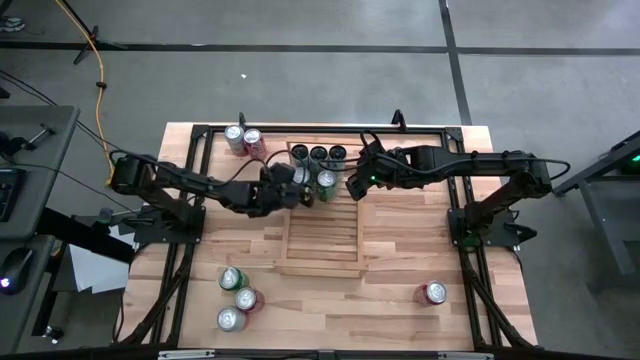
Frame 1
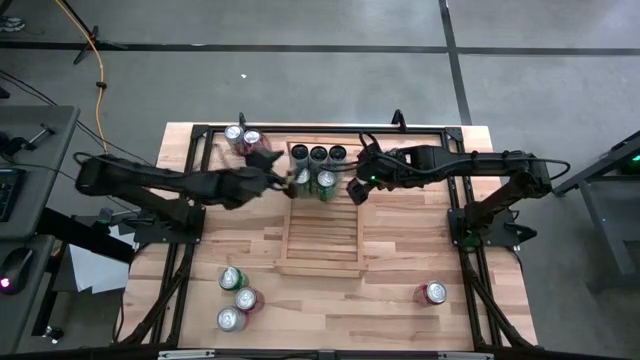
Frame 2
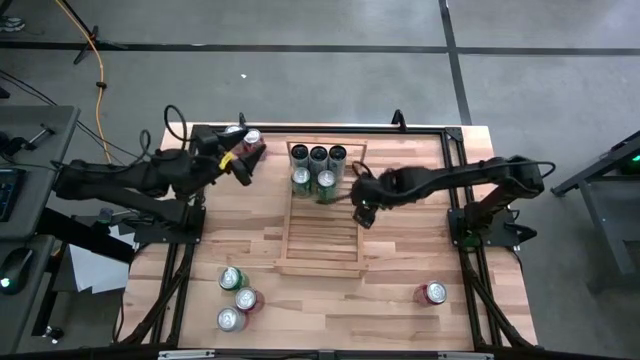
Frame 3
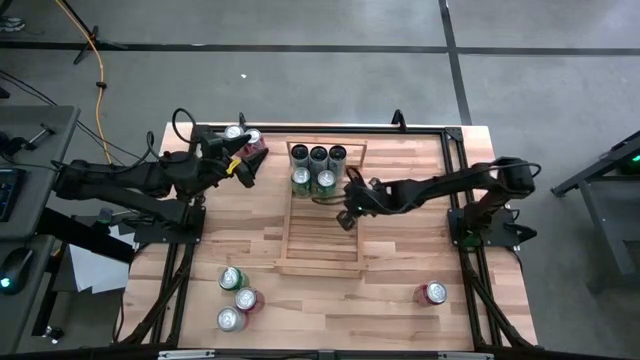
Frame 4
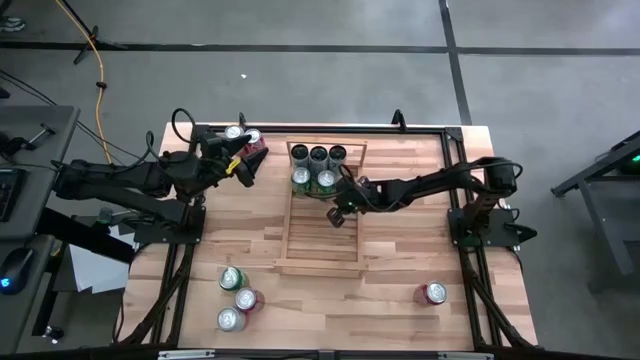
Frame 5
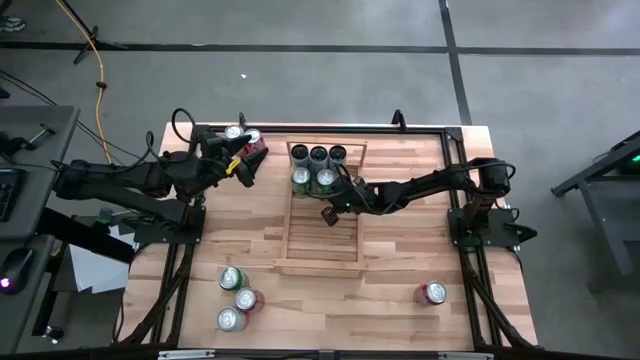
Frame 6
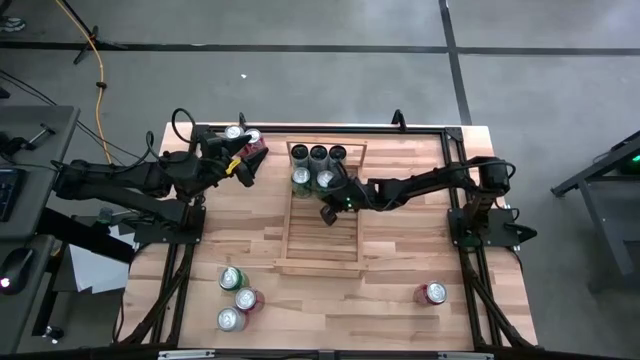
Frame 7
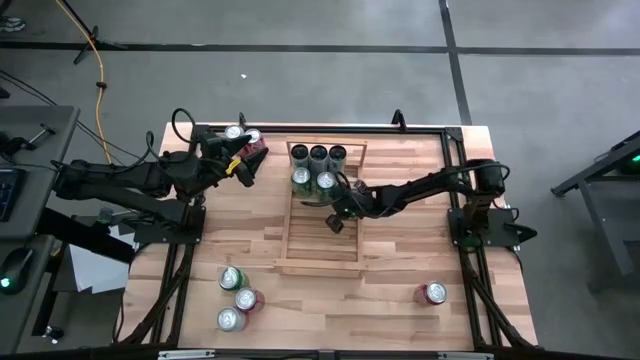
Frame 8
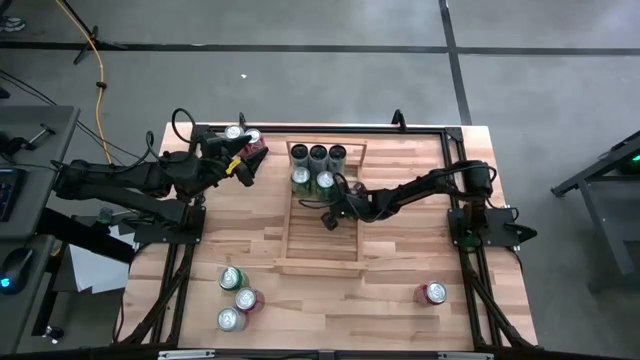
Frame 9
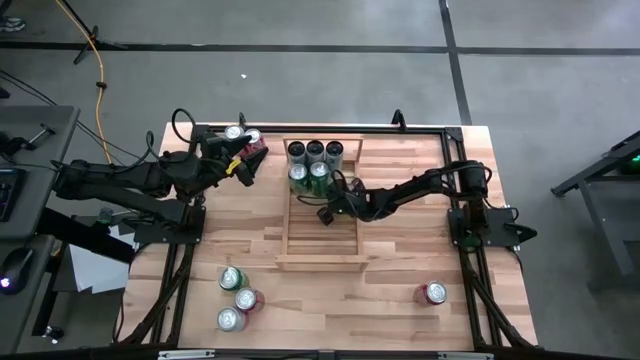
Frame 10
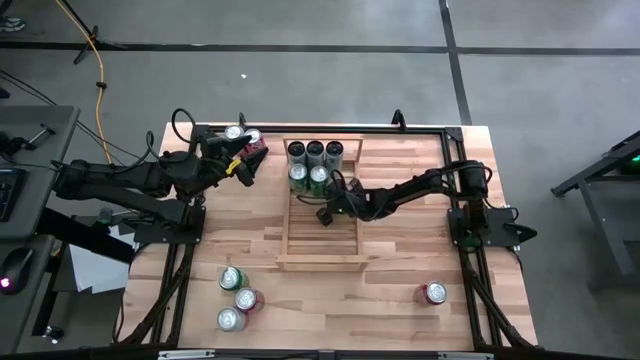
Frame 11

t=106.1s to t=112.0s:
Task: Place canned beverage on shelf
Adjust the green can on the shelf

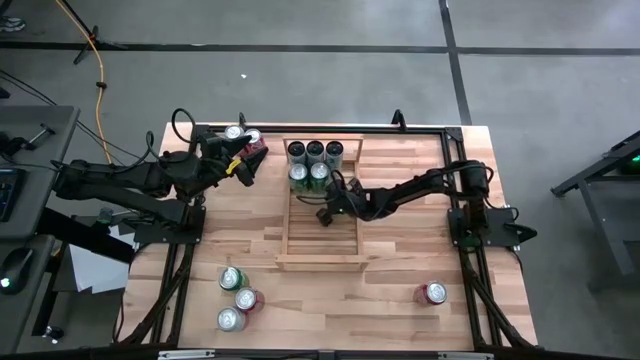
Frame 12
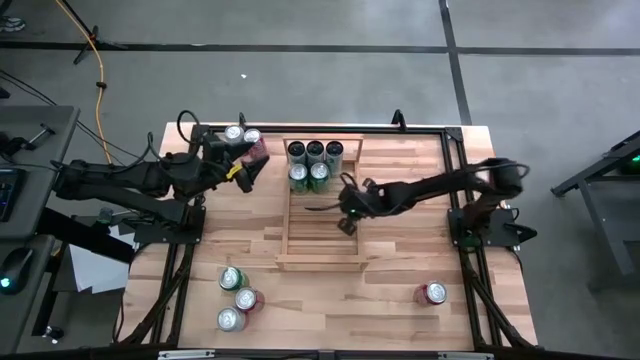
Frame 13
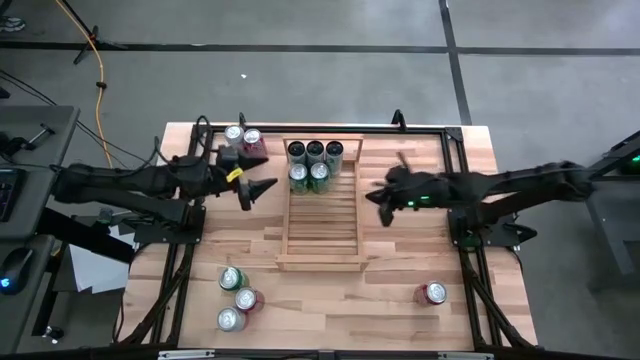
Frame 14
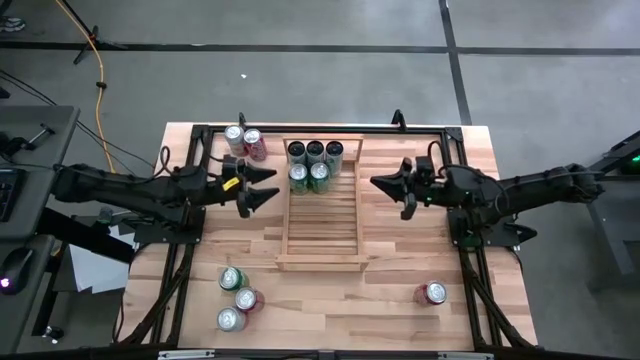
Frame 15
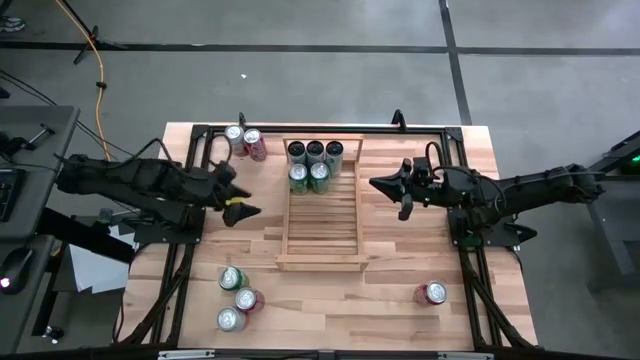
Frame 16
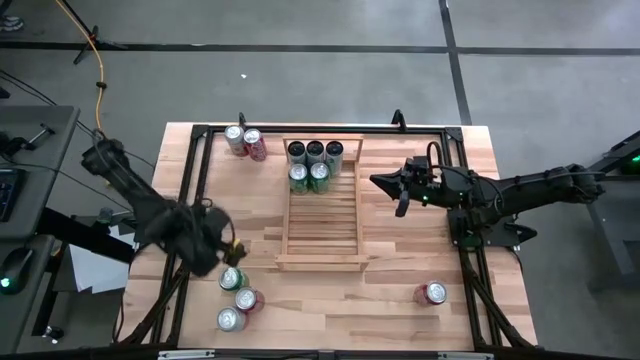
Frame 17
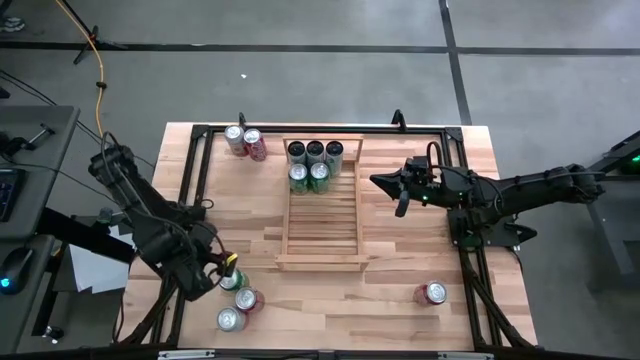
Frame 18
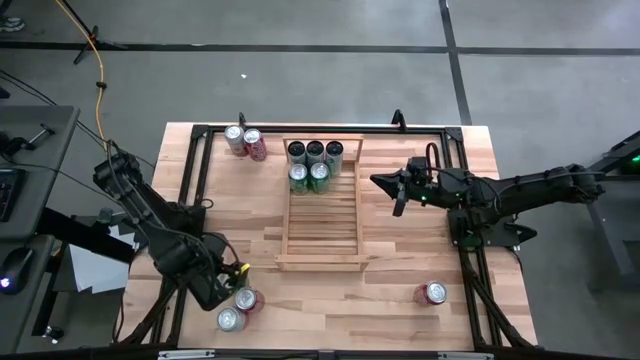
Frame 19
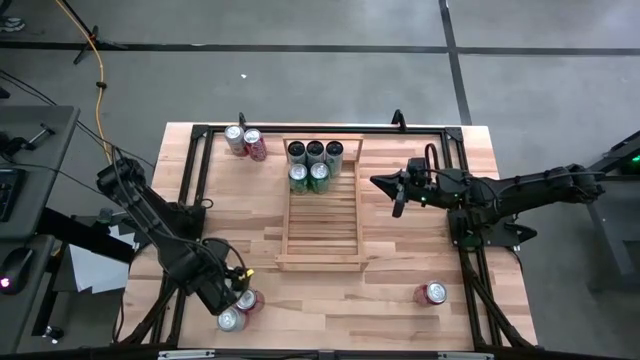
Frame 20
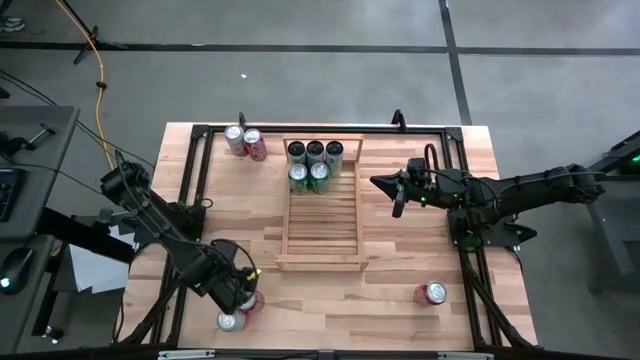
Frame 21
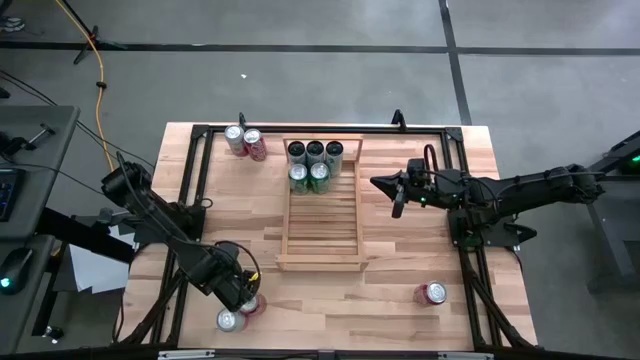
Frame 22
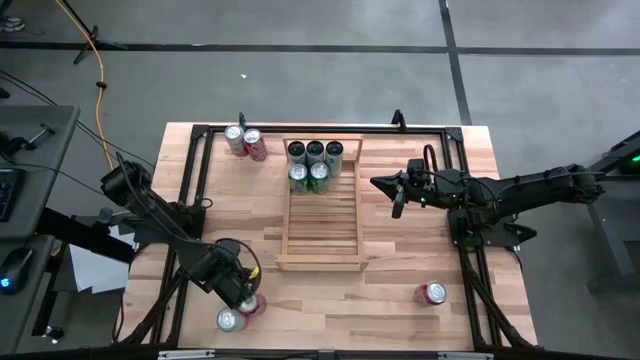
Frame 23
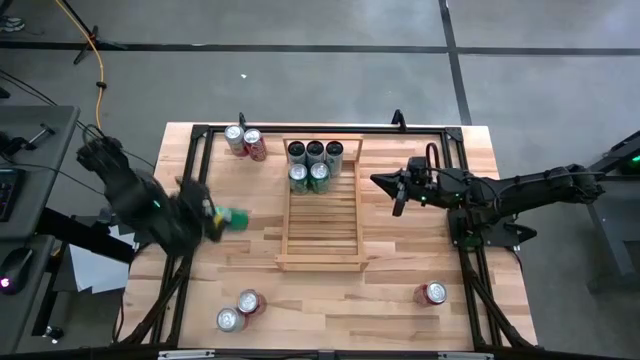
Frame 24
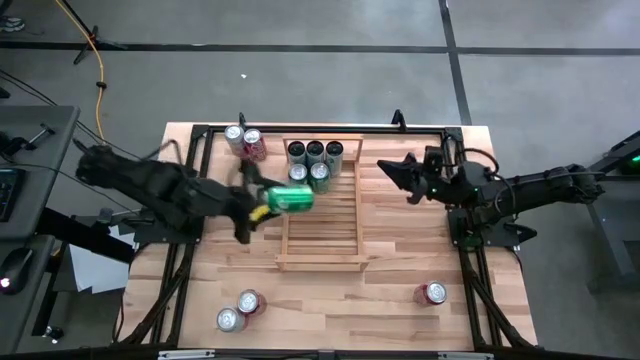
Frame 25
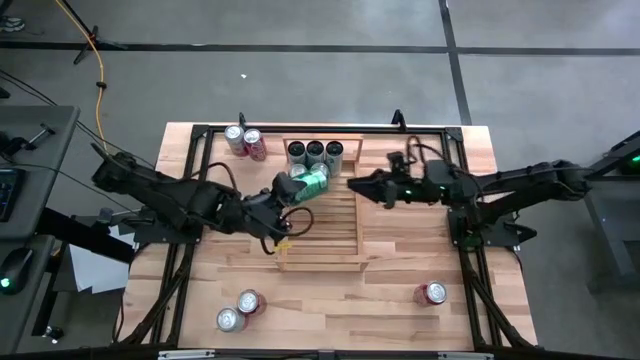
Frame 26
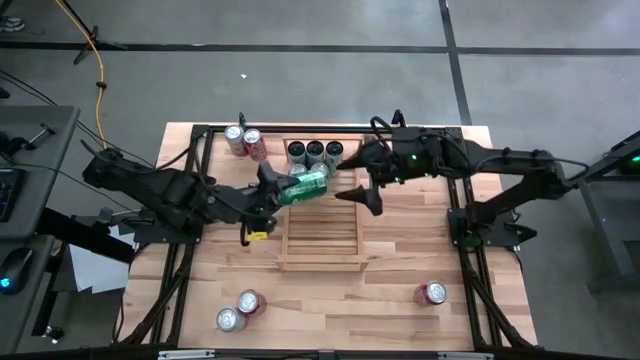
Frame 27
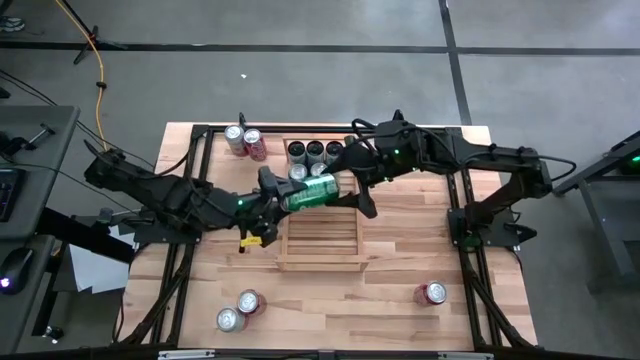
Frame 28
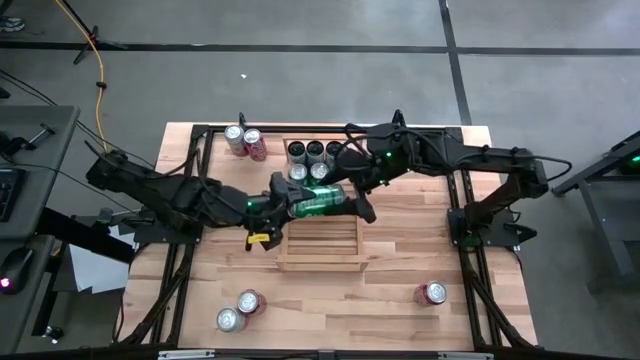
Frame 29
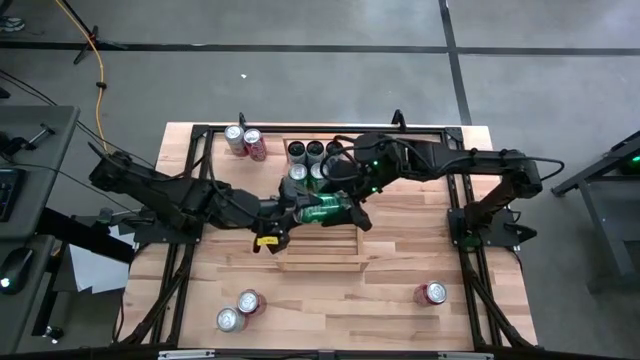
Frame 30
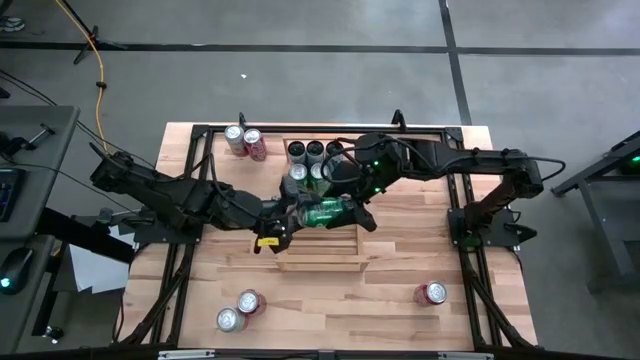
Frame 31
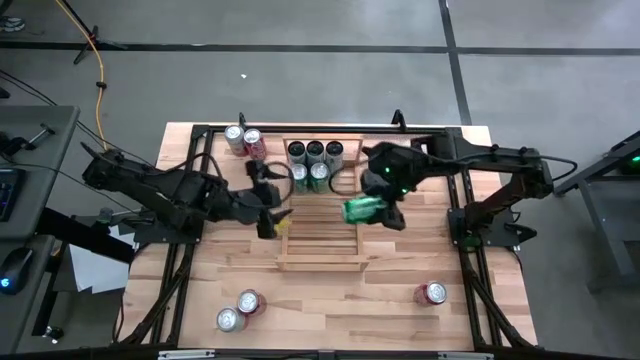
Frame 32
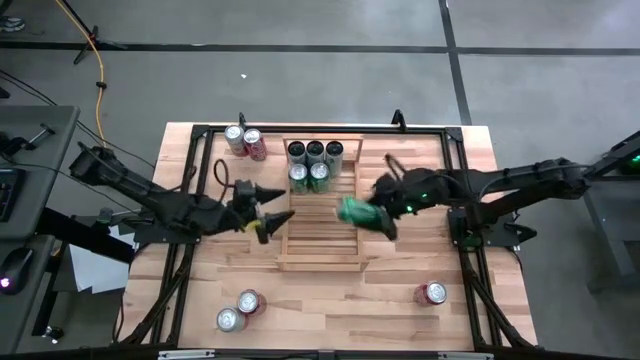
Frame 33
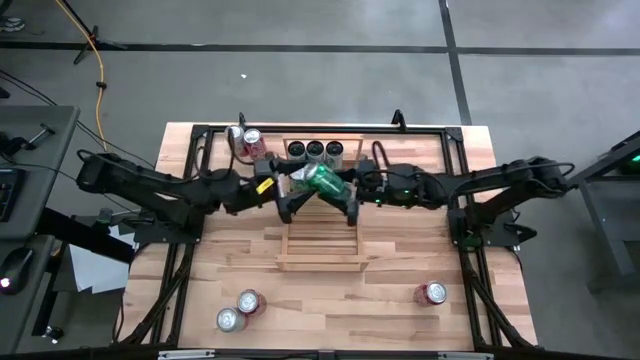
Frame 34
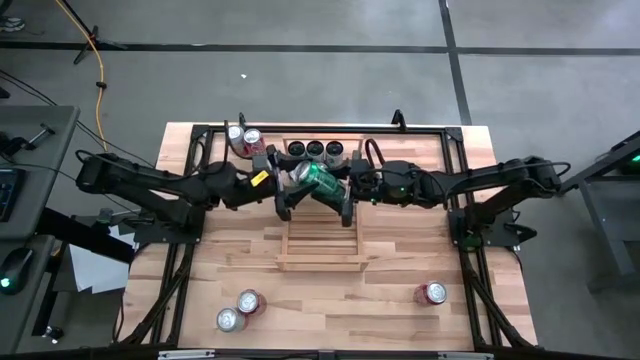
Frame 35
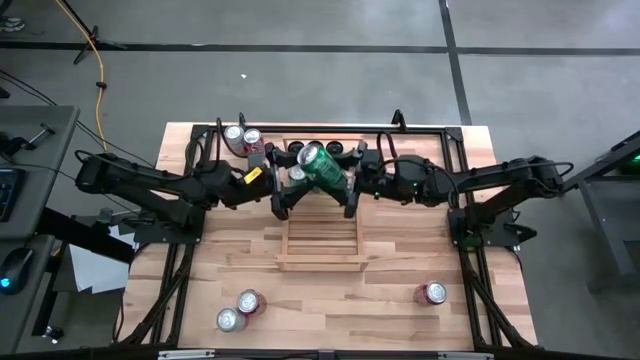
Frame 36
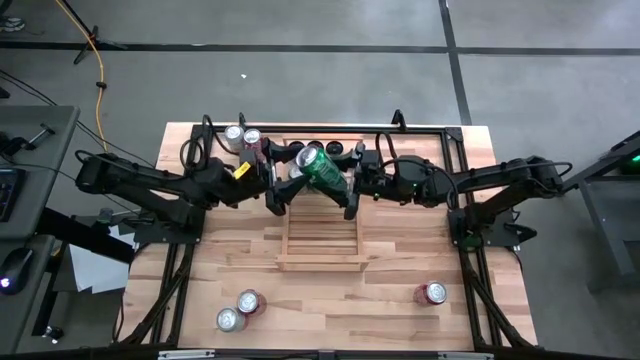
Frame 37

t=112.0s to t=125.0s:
Put the green can on the shelf aligned with the other green cans

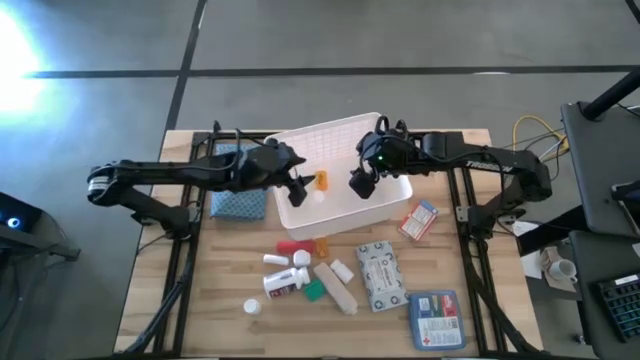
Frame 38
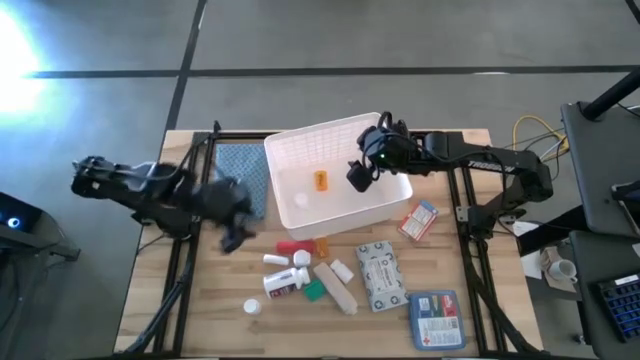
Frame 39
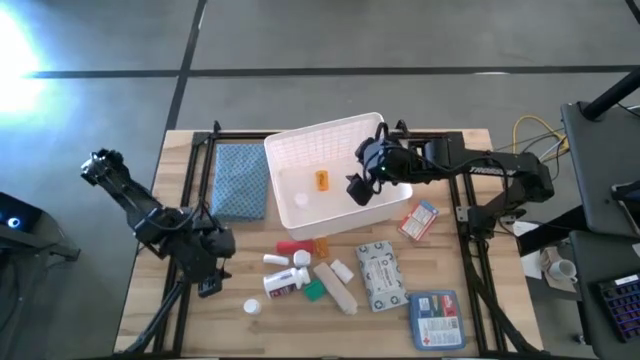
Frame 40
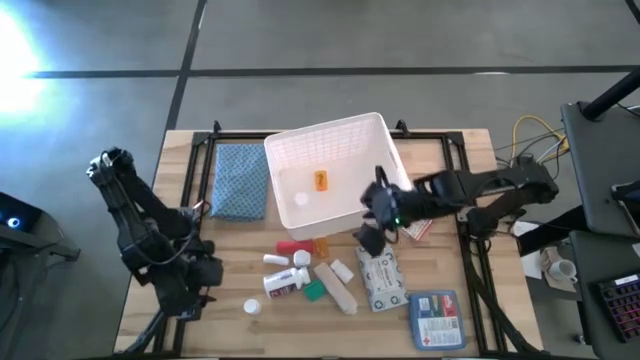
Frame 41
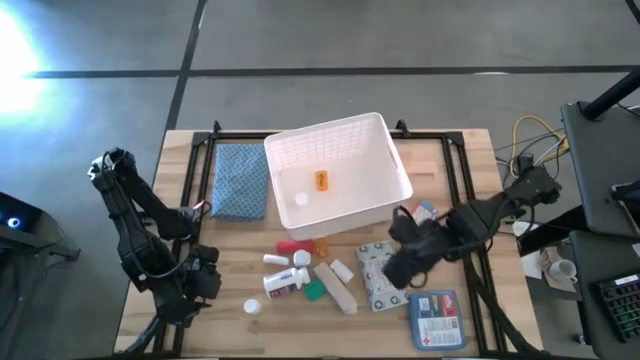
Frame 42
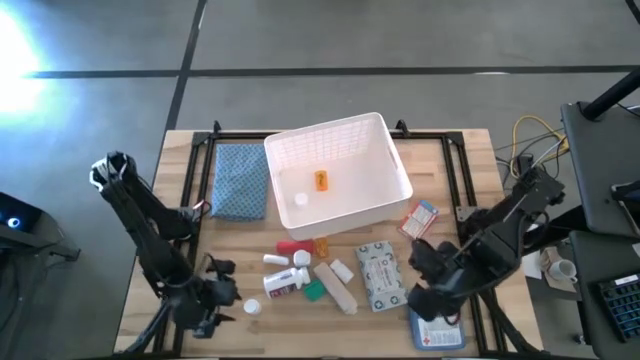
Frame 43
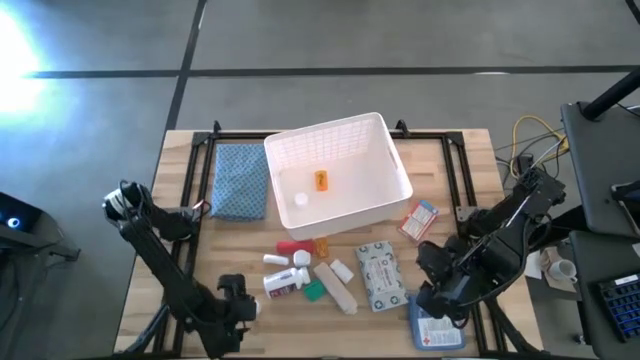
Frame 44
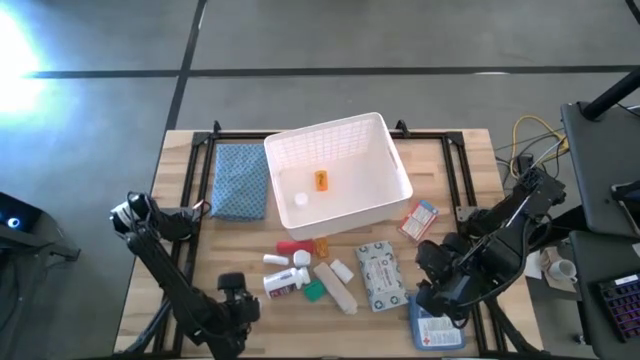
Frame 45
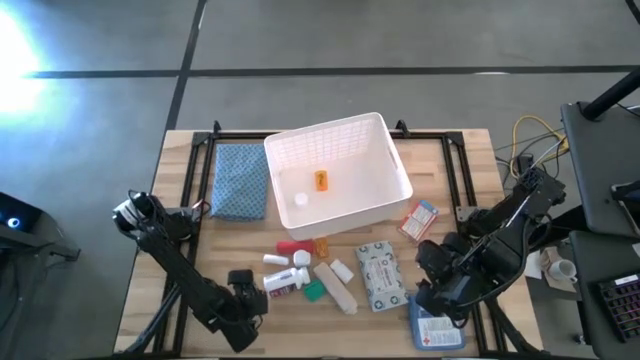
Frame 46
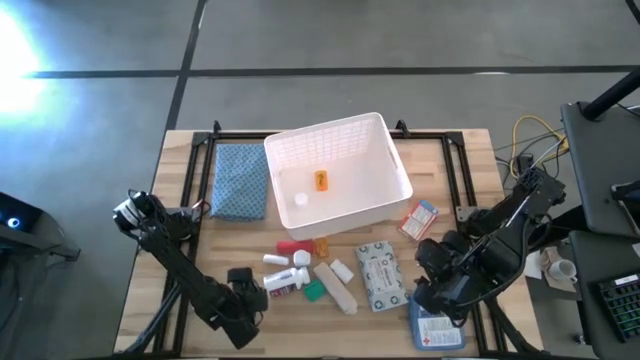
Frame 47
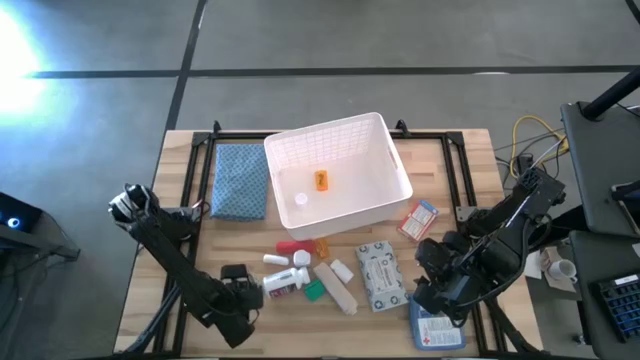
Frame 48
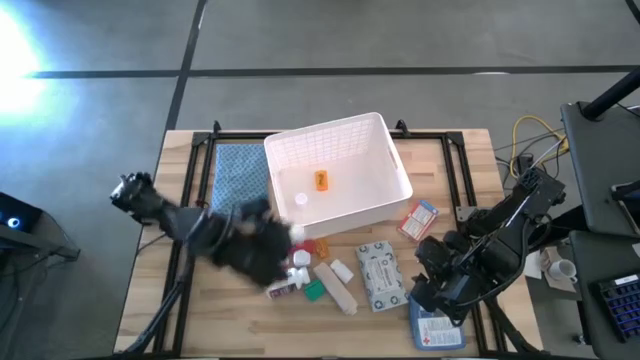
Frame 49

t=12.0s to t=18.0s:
Task: Pick & place medical supplies in basket/bin
Put the white pill bottle into the white bin
